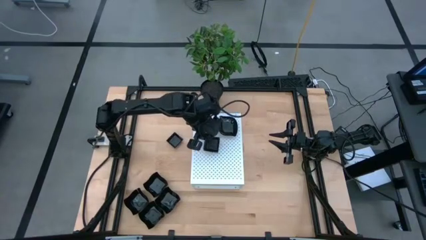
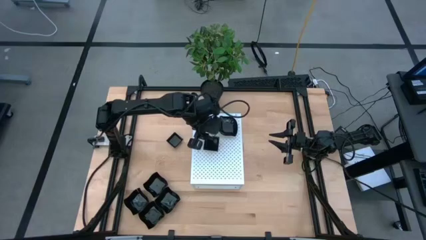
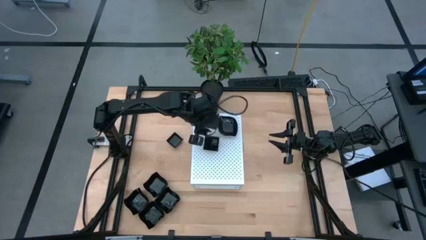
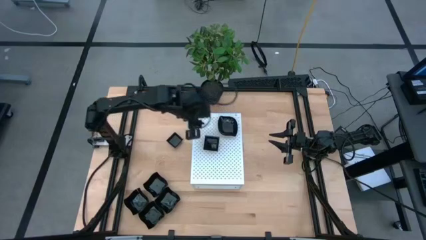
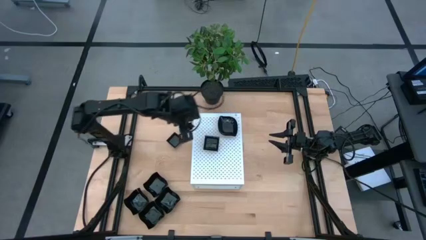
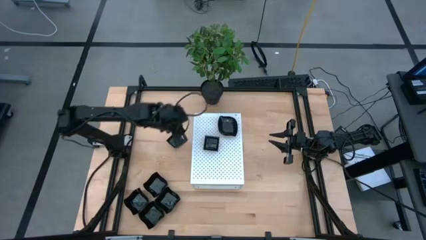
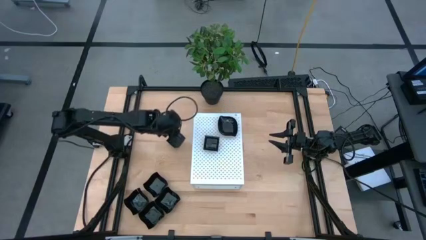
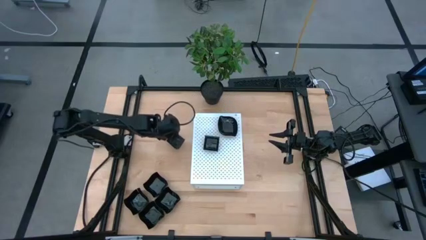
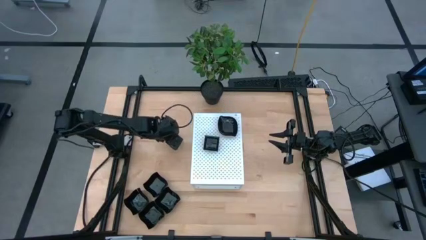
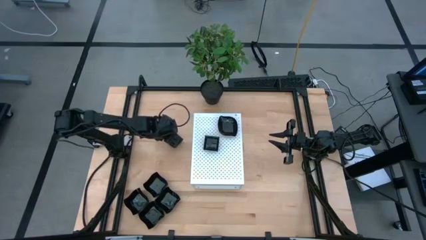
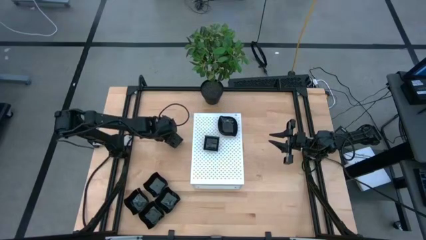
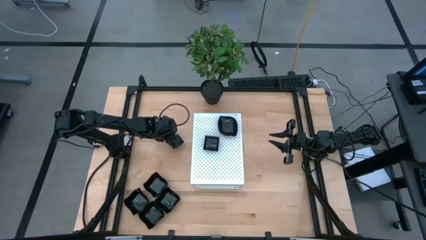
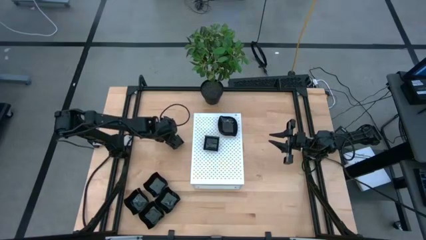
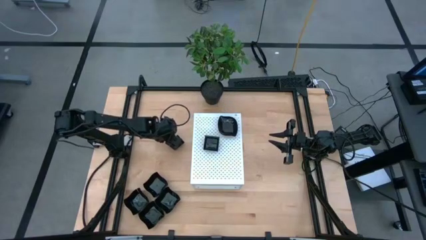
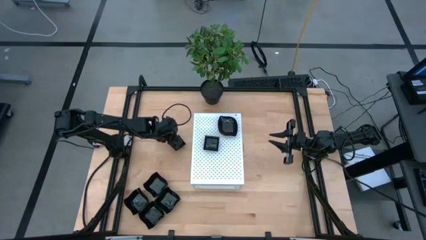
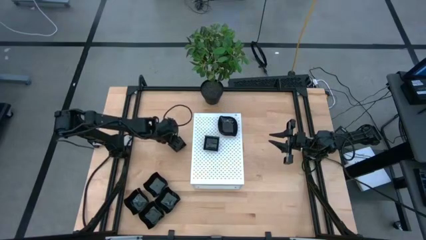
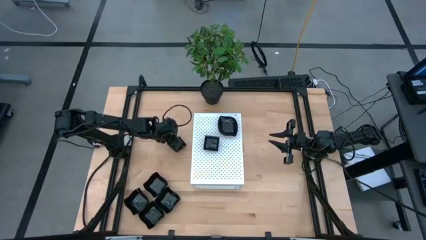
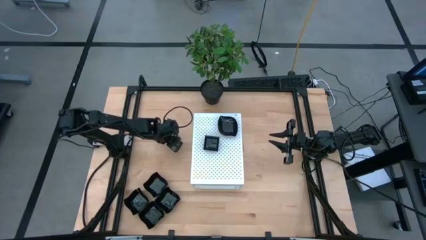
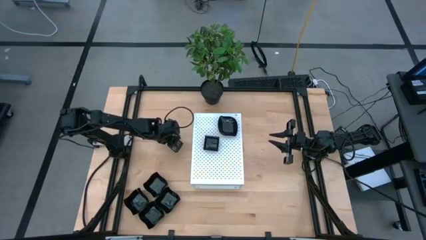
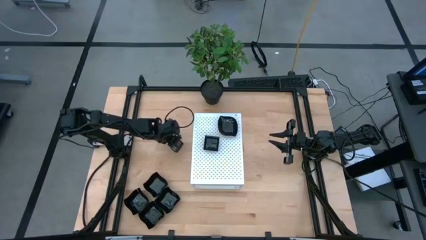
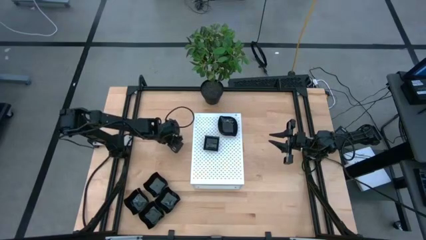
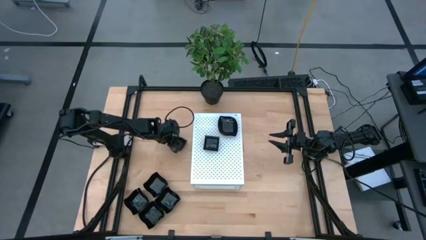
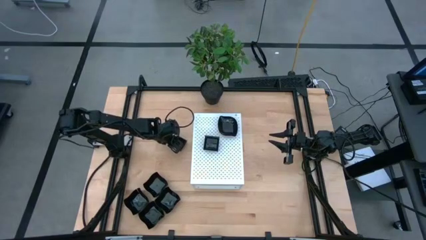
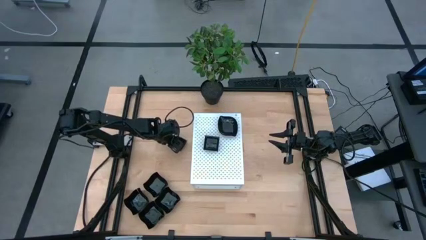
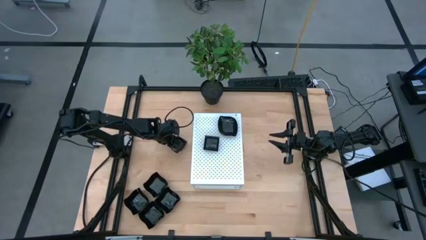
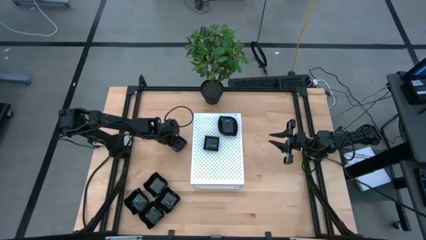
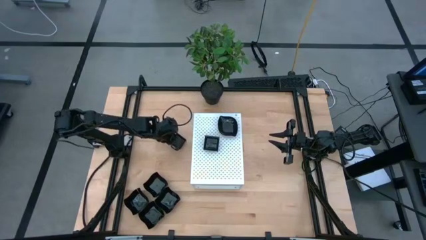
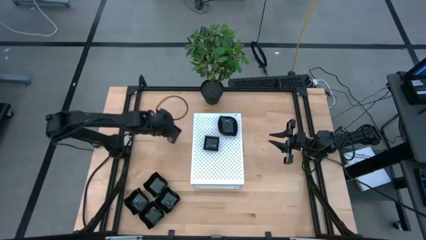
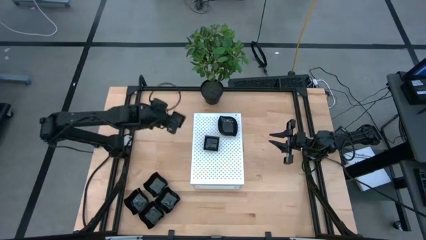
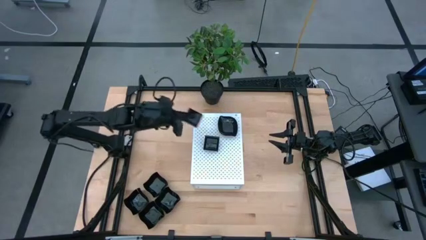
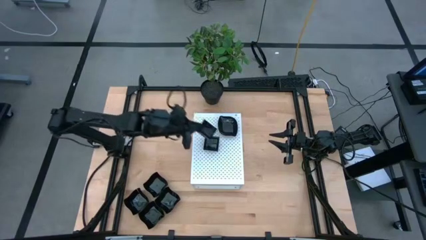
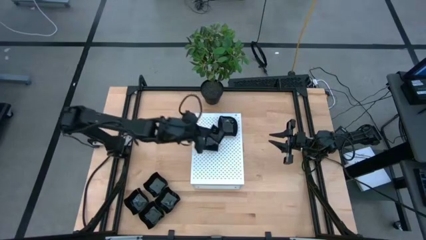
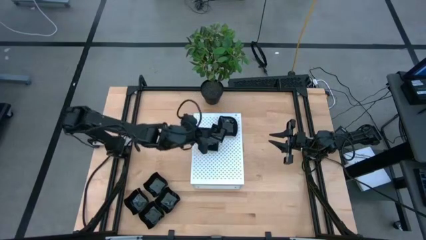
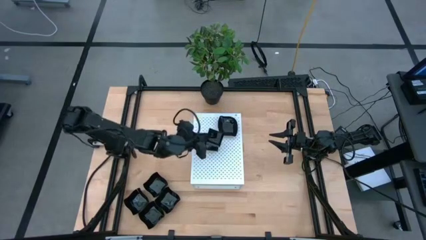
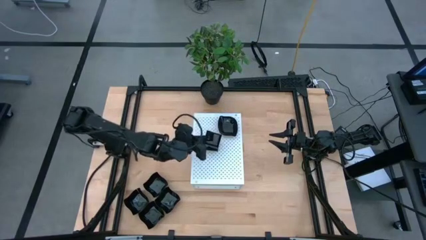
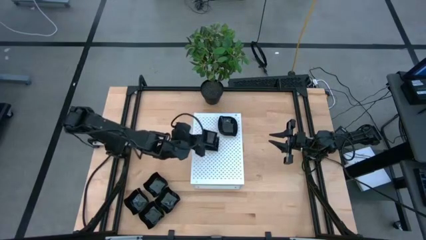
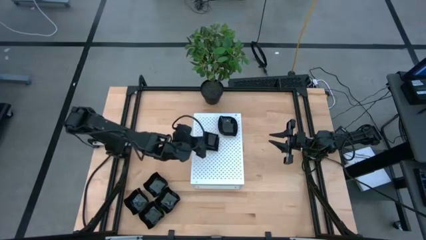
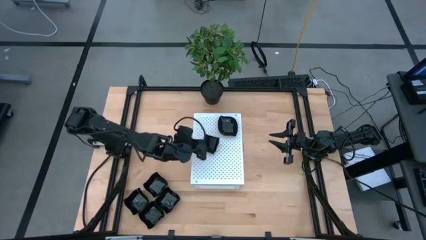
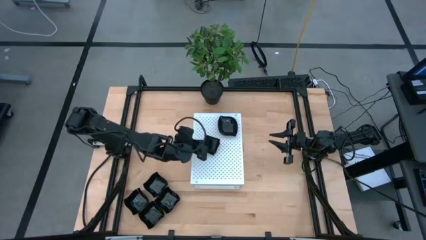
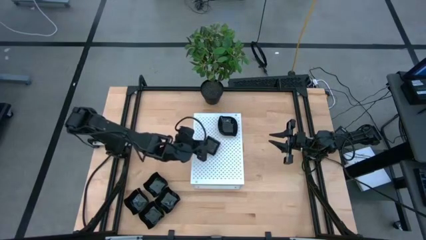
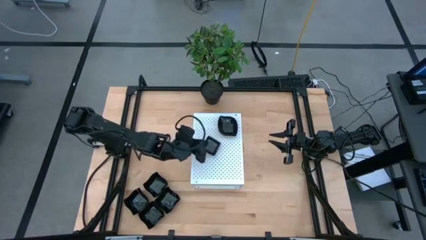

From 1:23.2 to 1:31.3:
Task: Pick & Place Mini shaped plates
Stack the black square plate on top of the the black square plate on the shelf

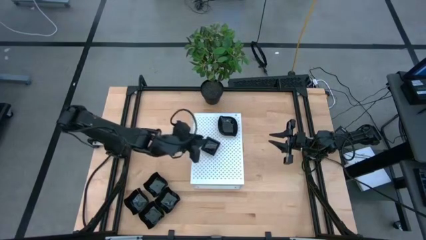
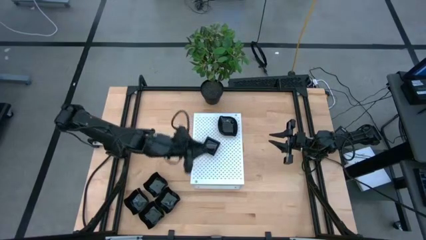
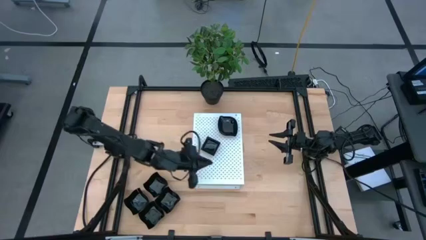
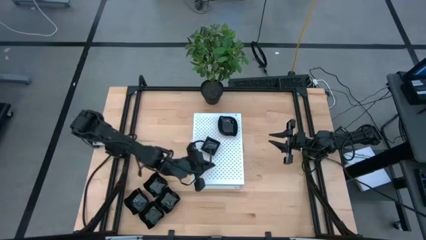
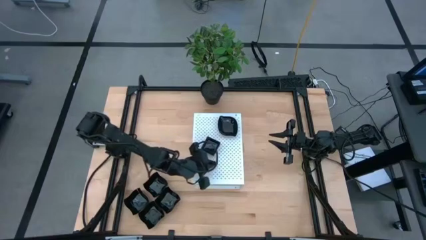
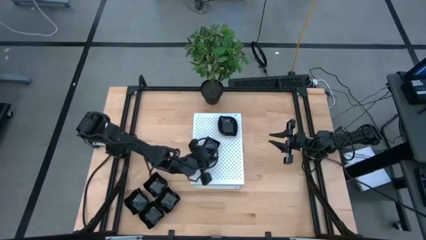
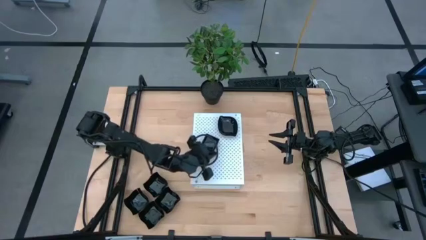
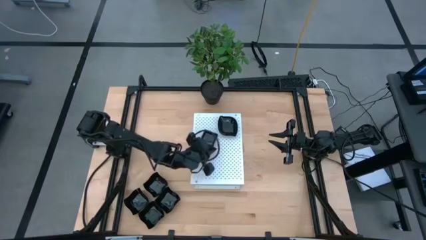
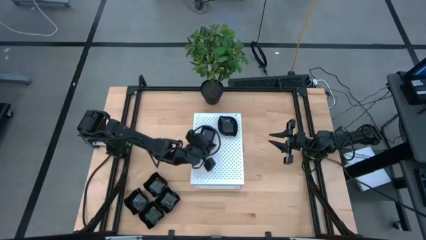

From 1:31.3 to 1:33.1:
Adjust the black square plate

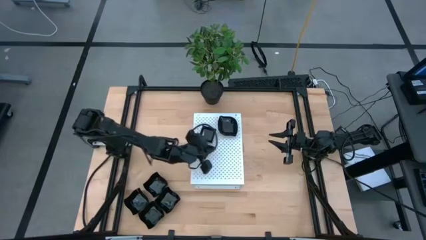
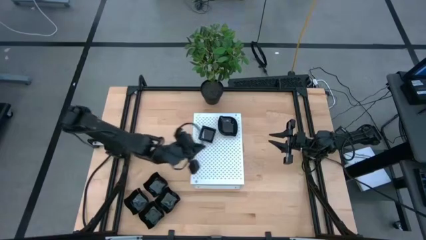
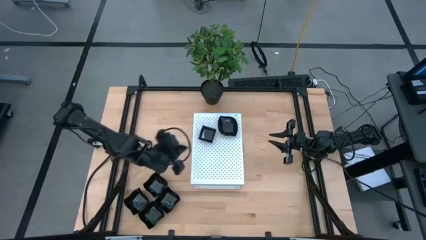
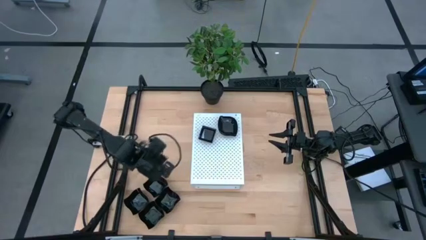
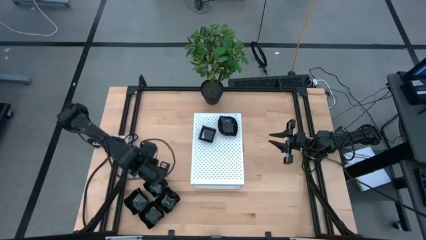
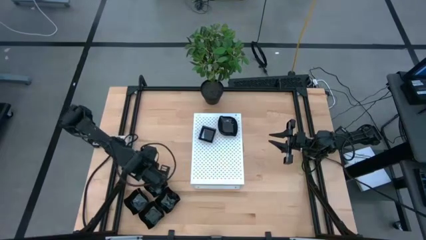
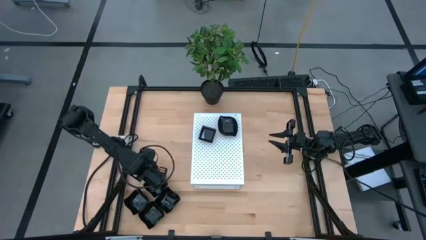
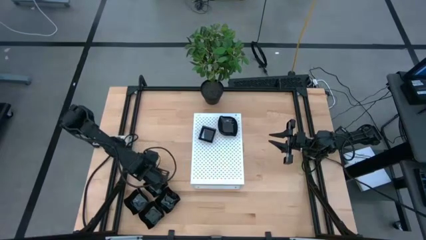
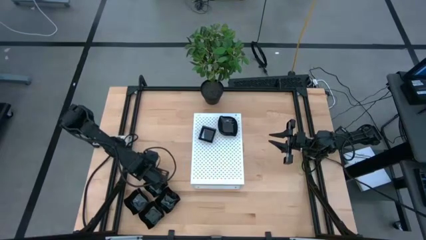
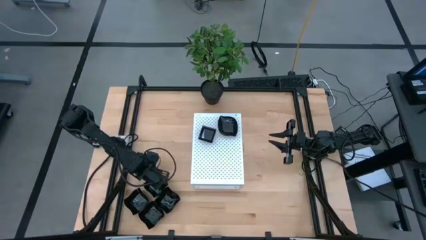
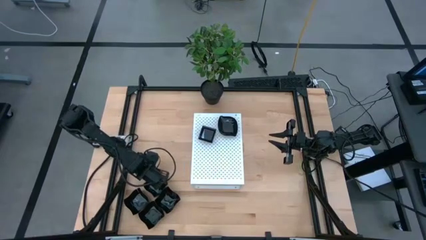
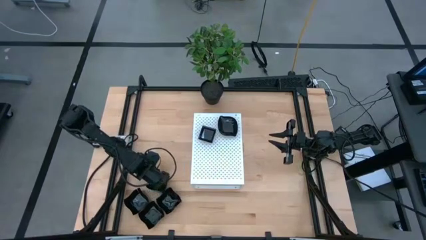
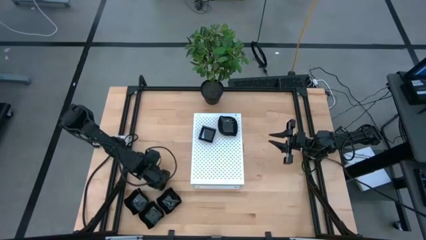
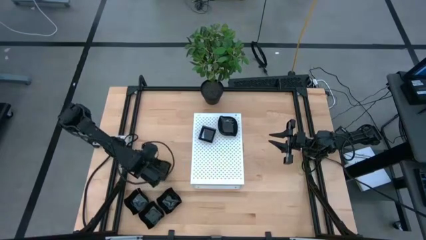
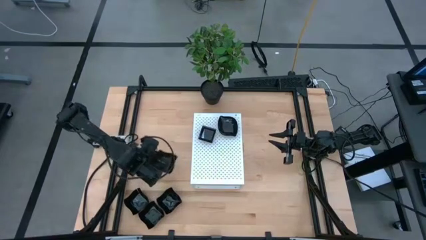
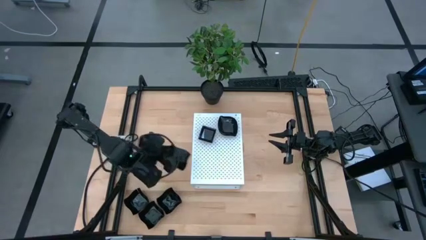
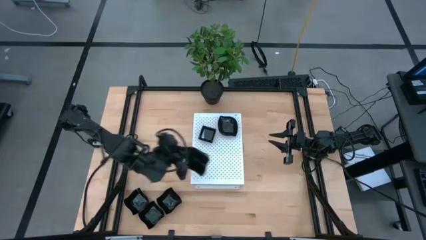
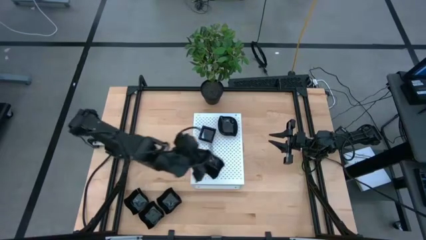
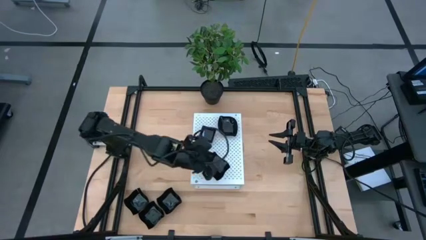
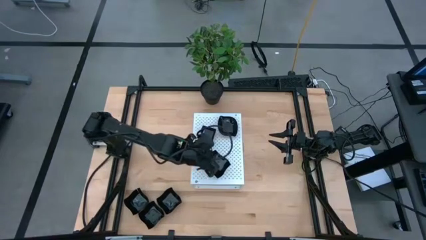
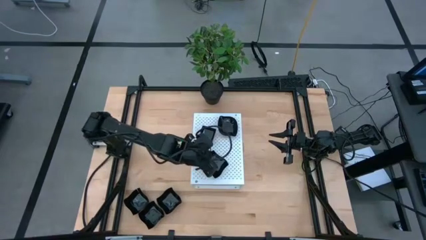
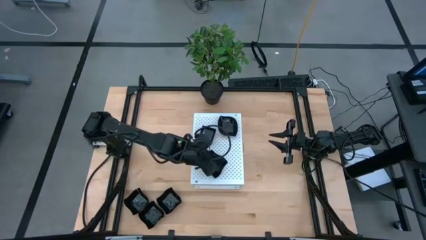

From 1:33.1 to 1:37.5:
Put the black distorted square plate on the shelf

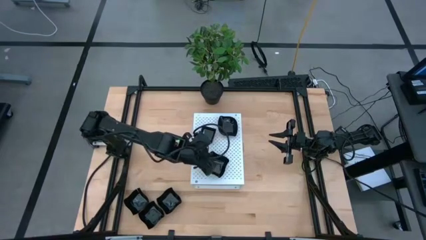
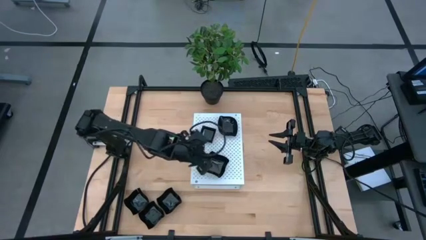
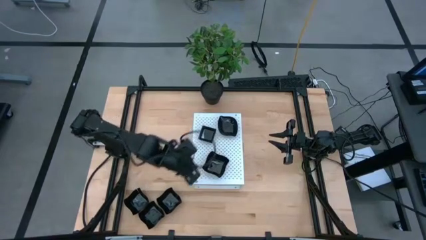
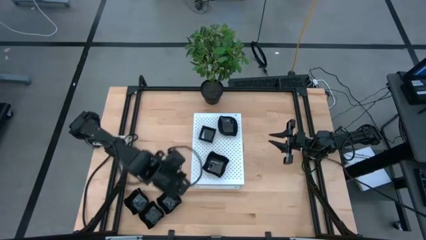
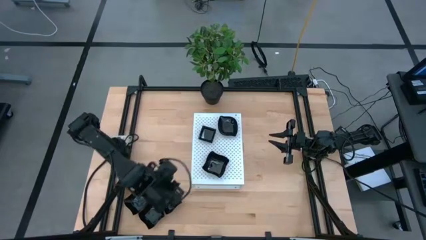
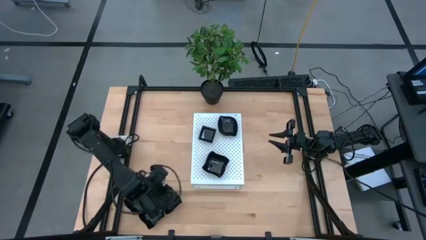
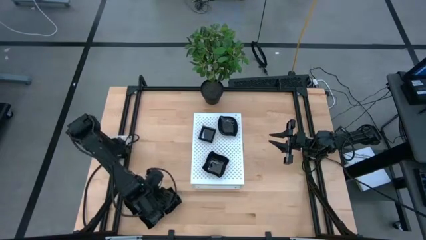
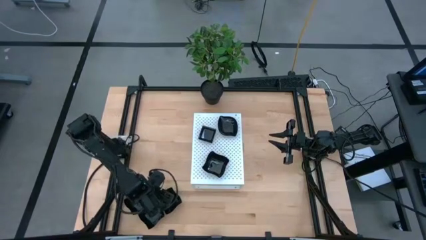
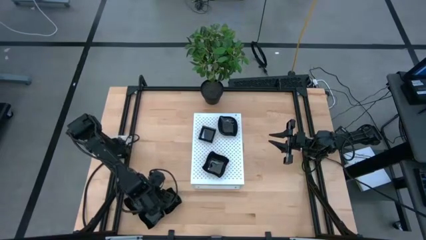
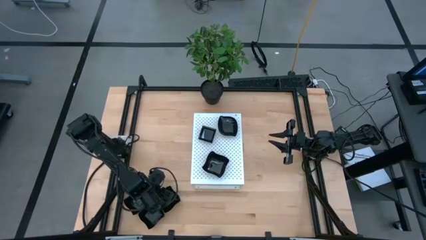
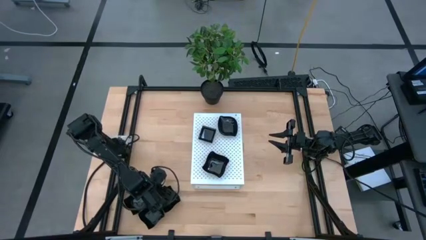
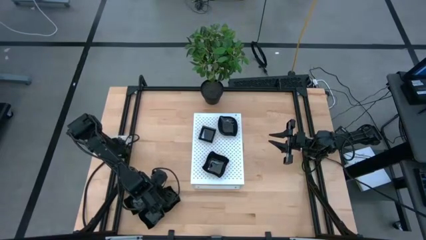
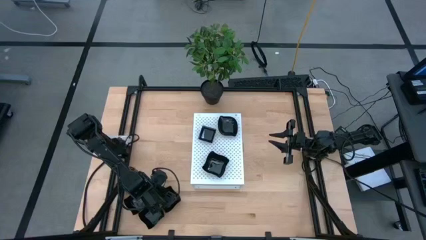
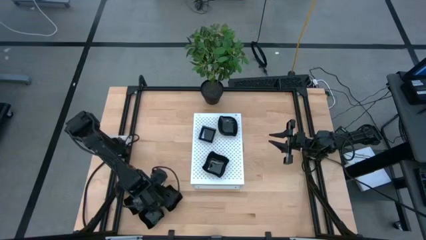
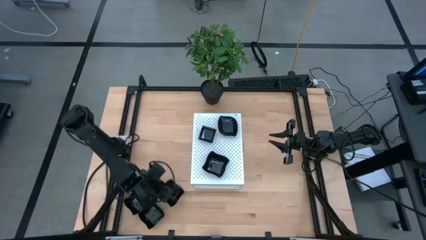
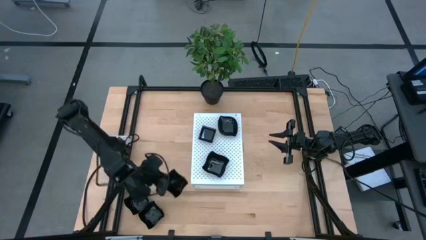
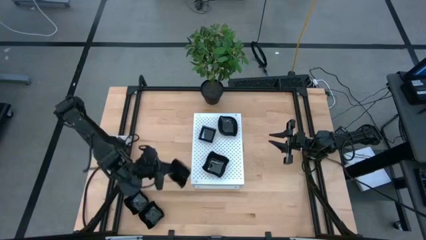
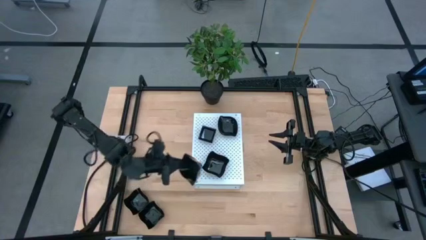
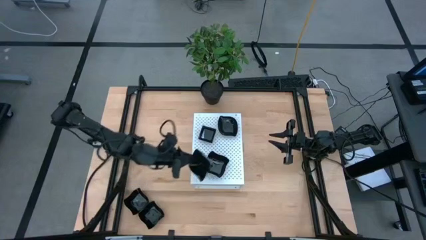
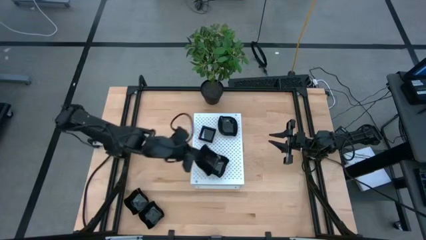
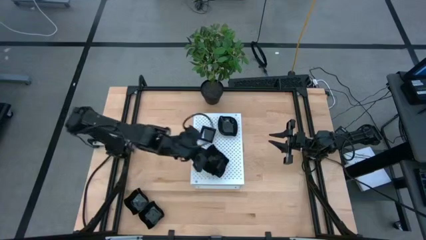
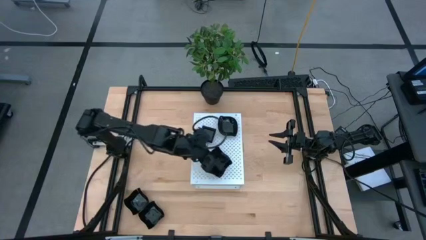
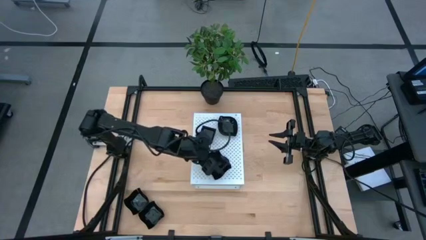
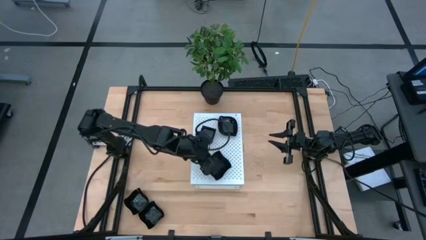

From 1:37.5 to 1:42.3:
Stack the black distorted square plate on top of the the black distorted square plate on the shelf
